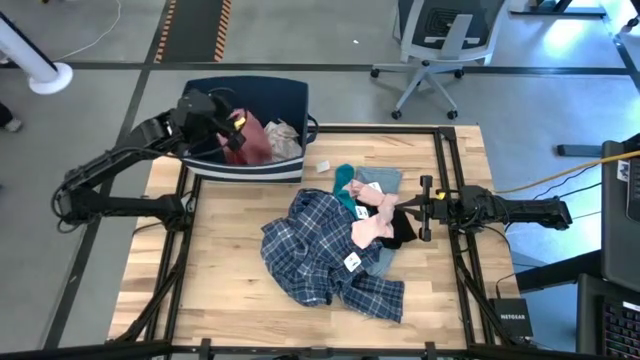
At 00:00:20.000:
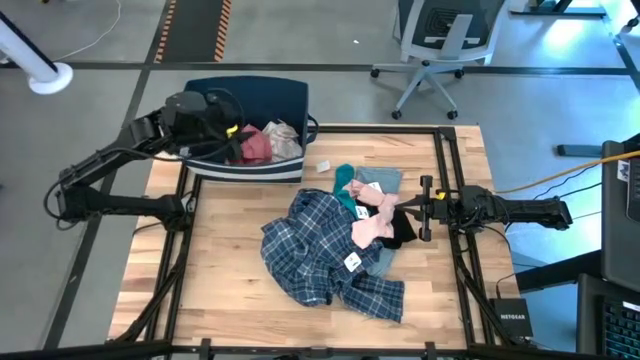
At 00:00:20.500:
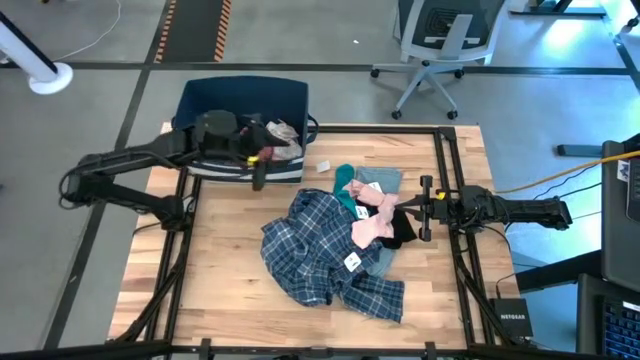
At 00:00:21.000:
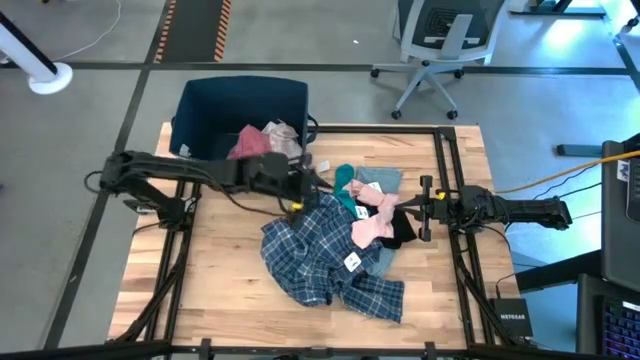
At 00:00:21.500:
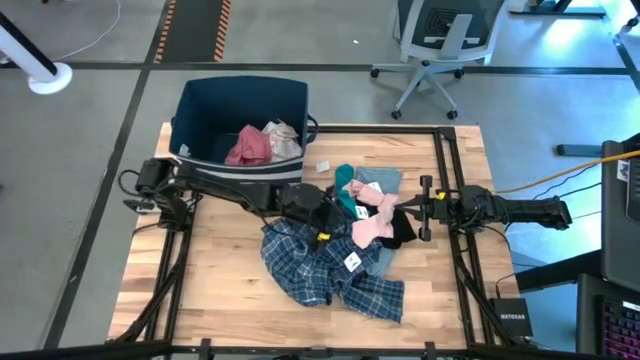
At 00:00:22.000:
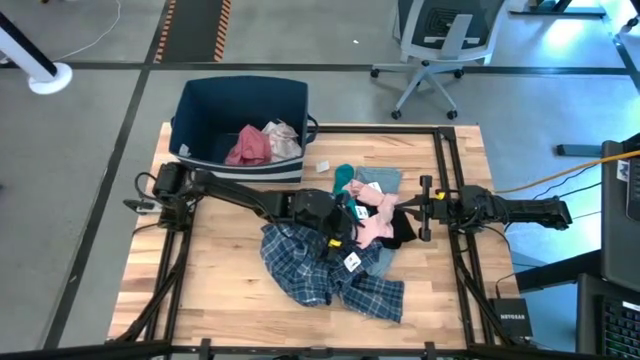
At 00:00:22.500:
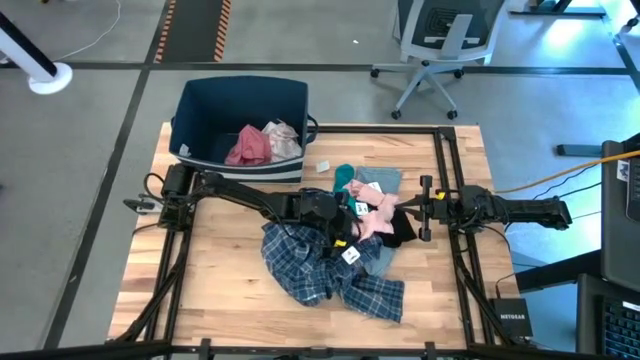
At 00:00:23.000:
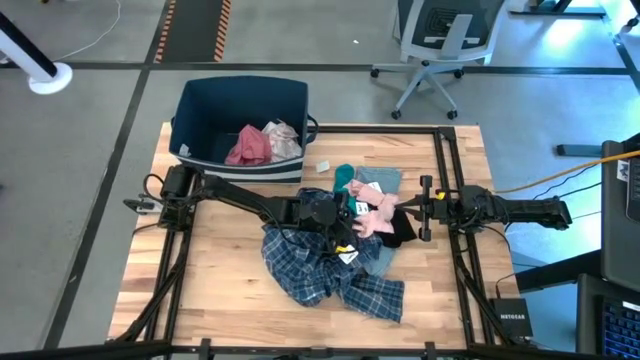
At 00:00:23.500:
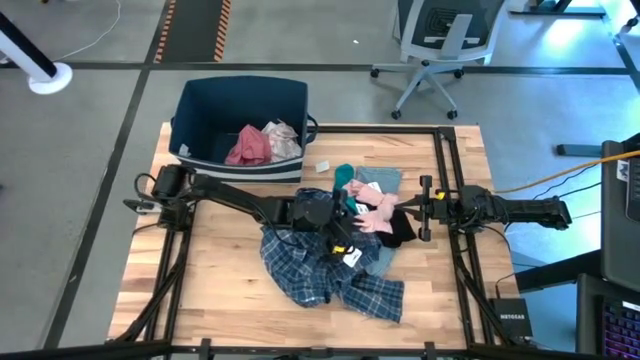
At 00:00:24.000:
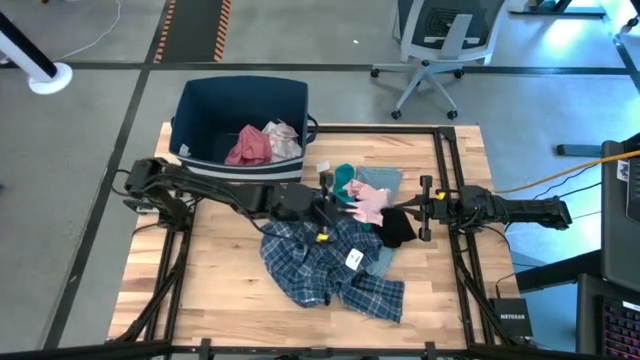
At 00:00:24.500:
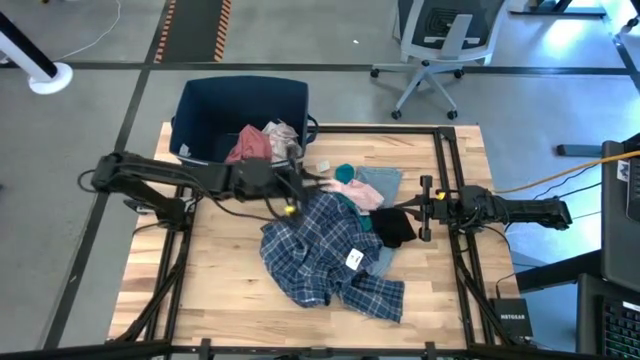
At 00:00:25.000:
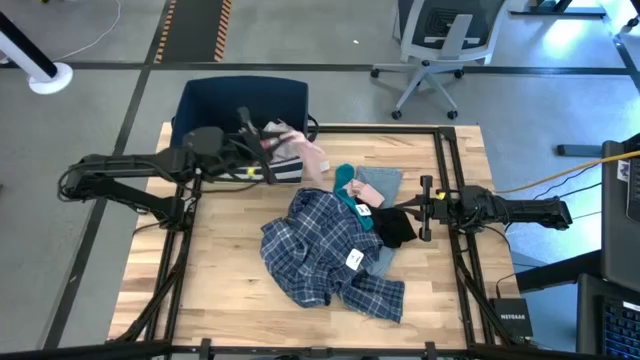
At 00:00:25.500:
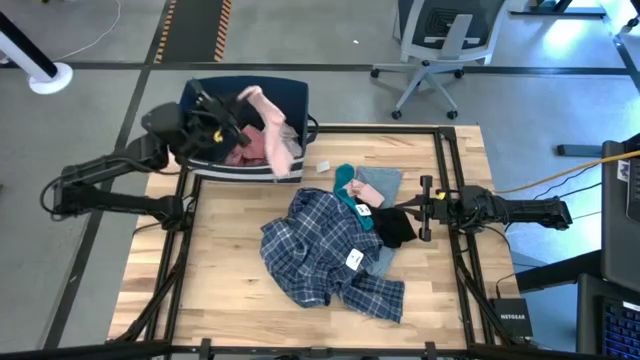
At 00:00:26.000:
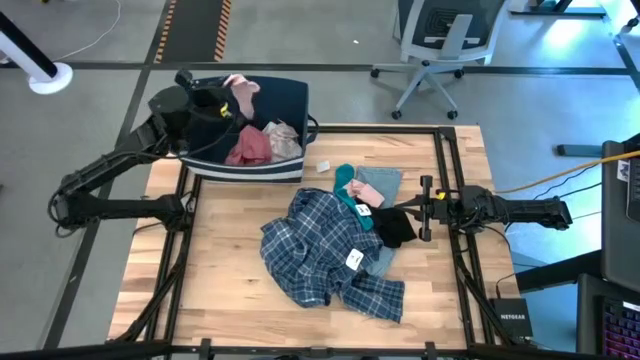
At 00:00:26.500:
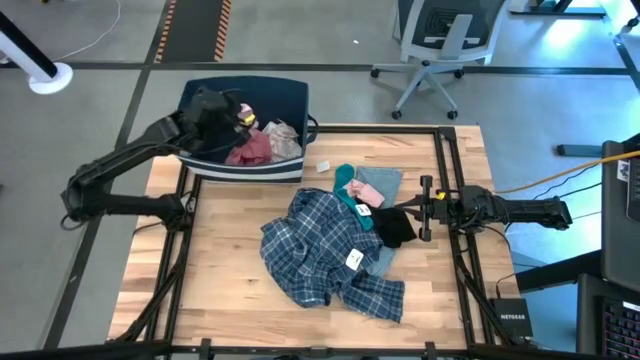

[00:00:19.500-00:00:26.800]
Task: Sort clothes
Put the bottom light orange sock into the blue laundry bin

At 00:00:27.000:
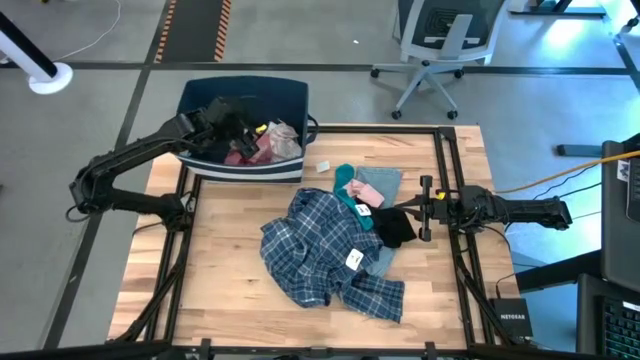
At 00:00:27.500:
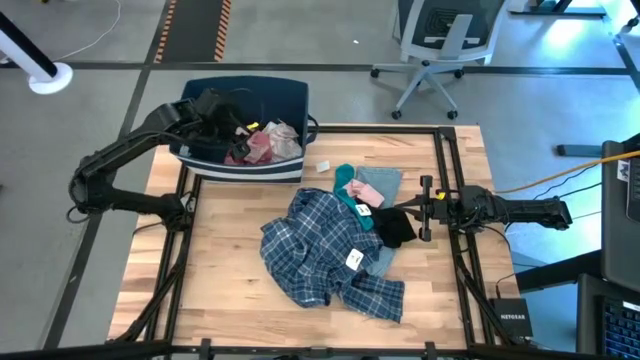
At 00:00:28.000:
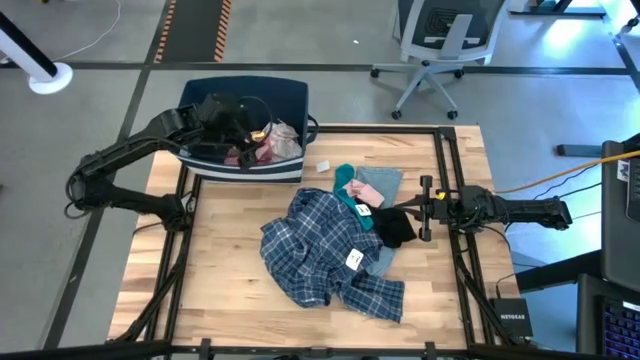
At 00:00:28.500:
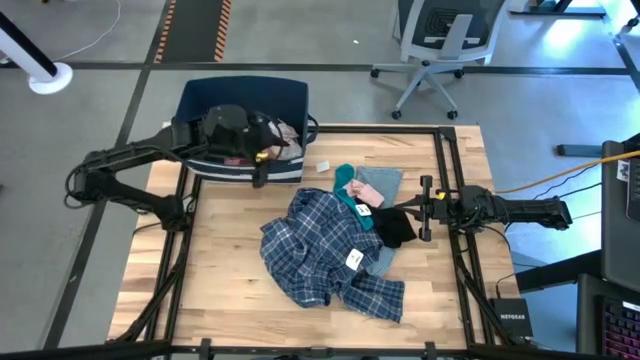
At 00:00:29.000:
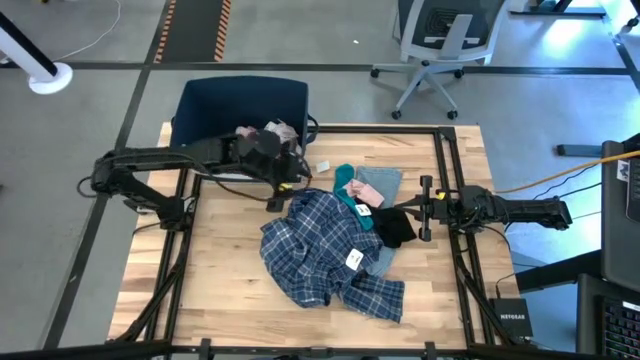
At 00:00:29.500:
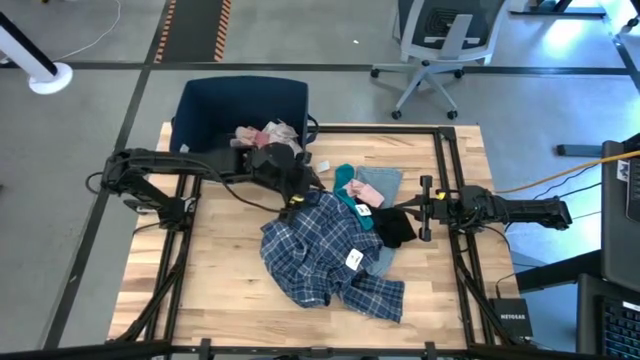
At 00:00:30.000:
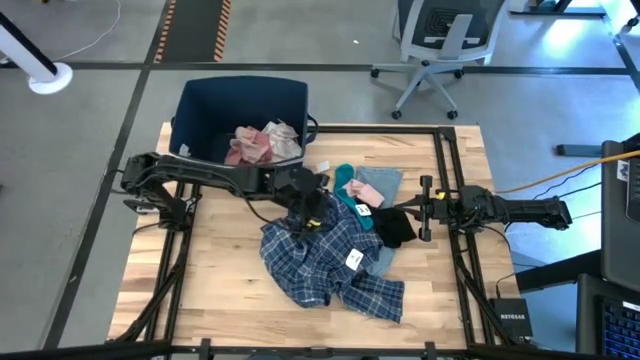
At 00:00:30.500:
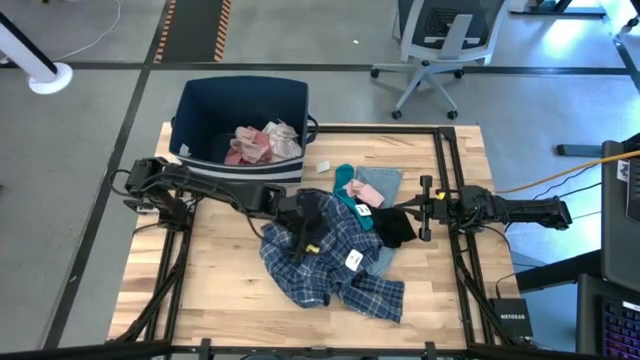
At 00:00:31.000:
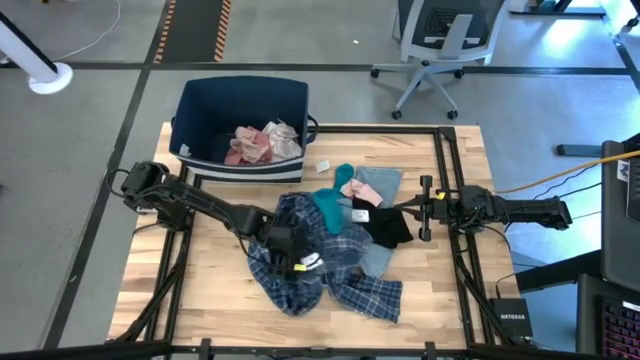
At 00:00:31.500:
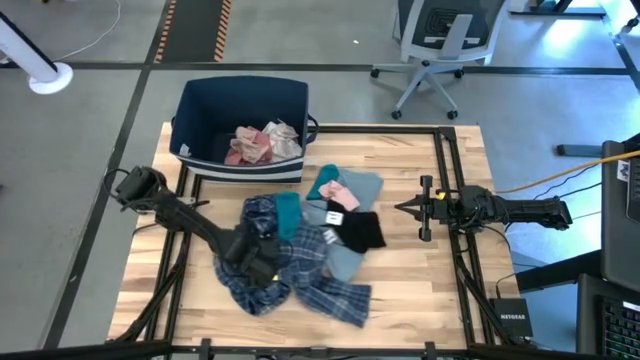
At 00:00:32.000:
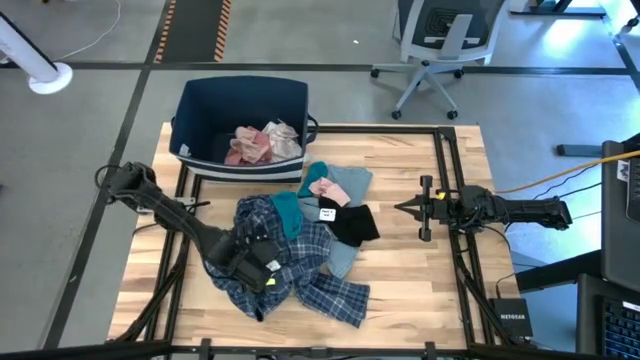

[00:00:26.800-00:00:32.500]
Move the clothes to the middle left

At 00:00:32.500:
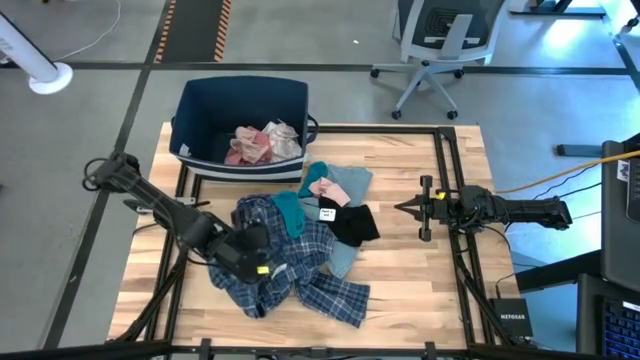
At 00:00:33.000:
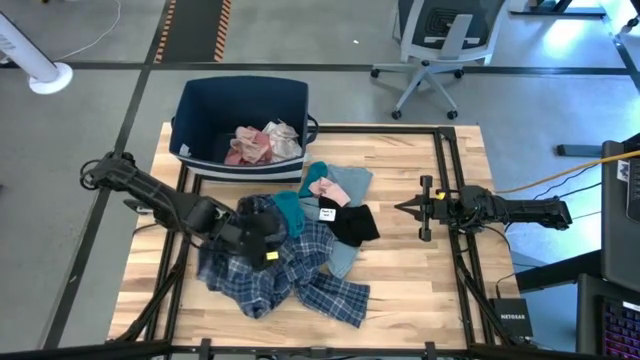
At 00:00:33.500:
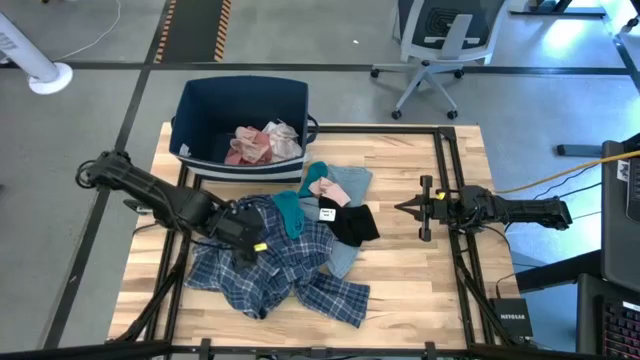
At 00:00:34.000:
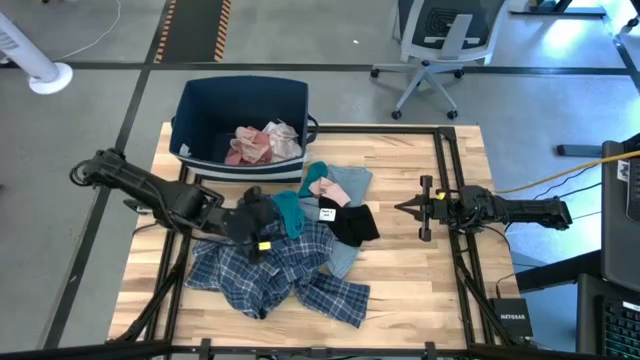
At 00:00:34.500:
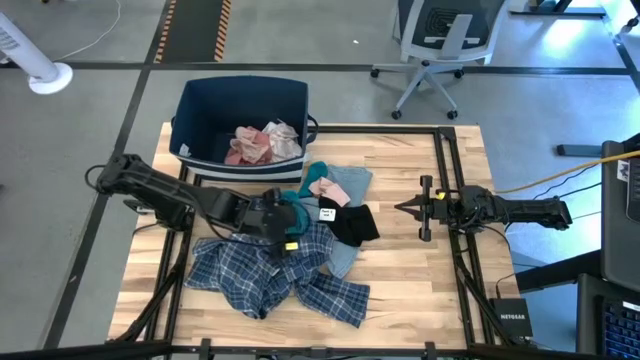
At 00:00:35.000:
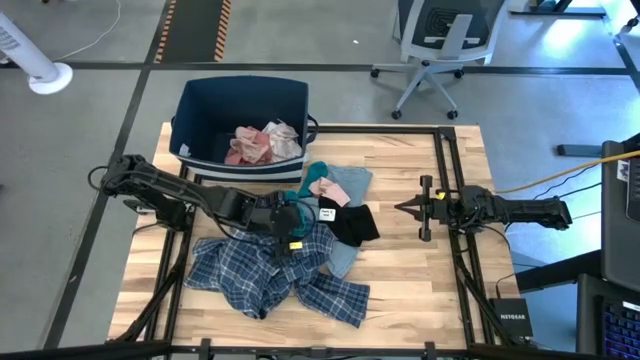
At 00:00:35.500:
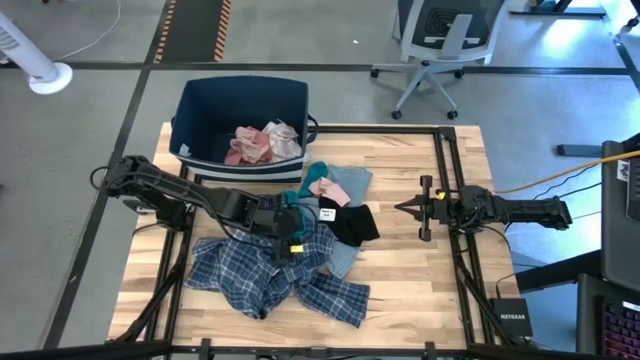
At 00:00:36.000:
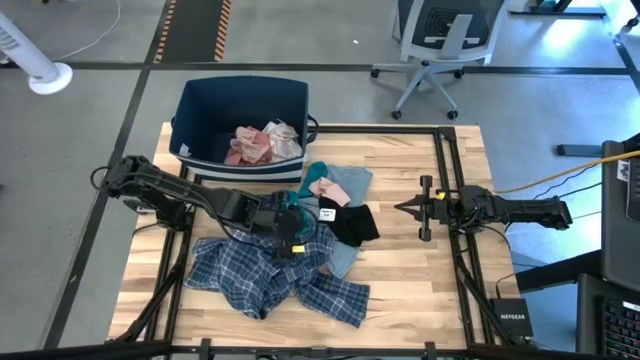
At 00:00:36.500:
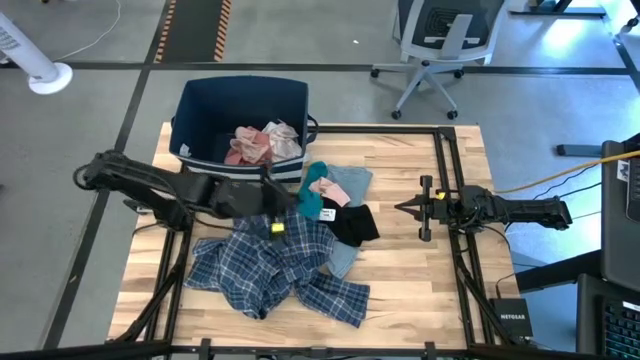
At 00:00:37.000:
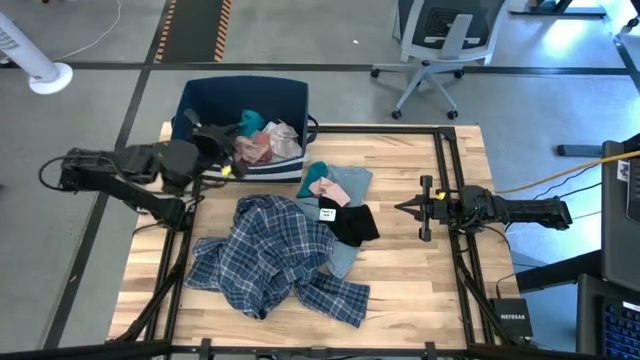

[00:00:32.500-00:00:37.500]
Put the bottom blue sock into the blue laundry bin

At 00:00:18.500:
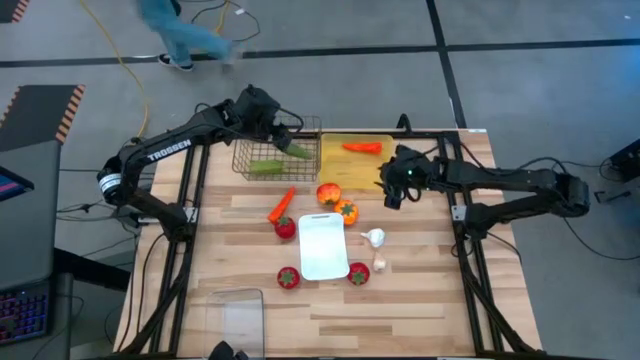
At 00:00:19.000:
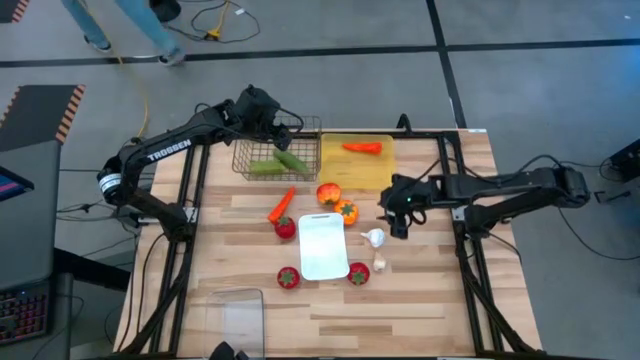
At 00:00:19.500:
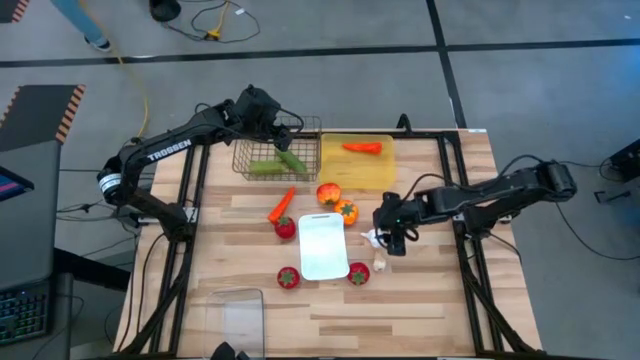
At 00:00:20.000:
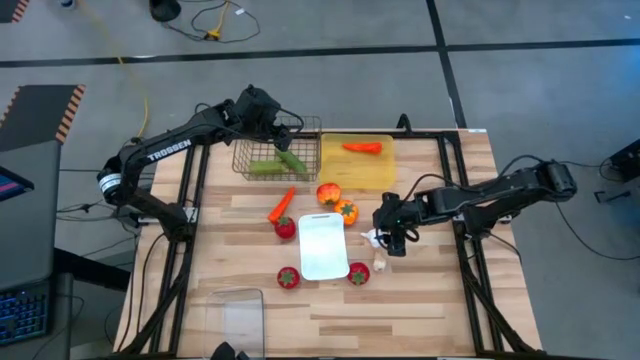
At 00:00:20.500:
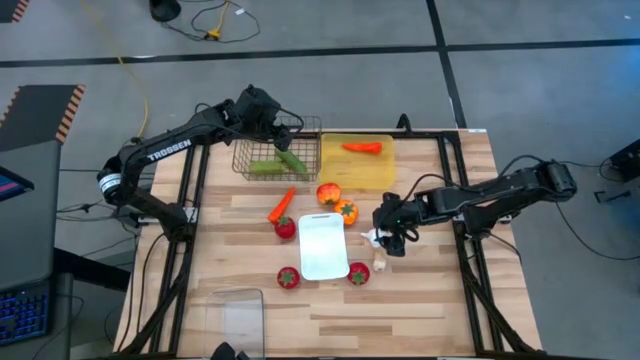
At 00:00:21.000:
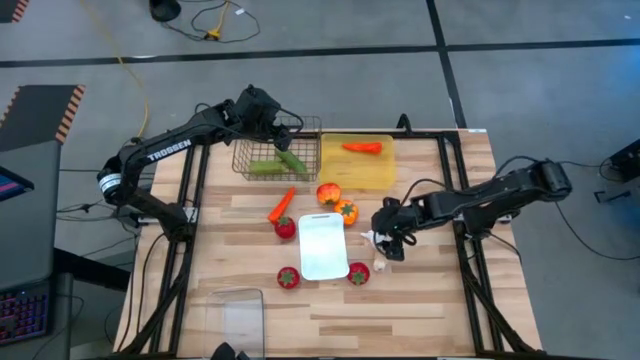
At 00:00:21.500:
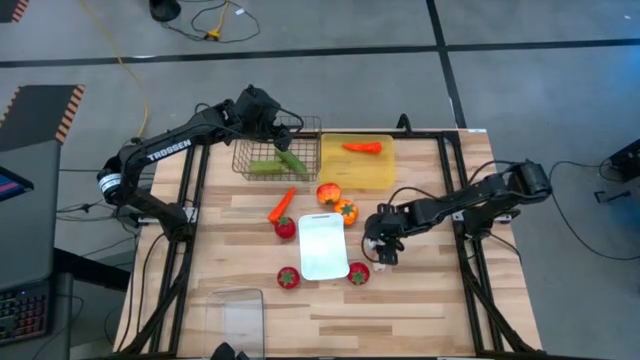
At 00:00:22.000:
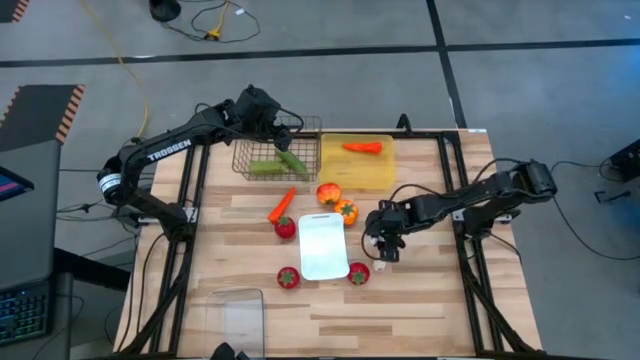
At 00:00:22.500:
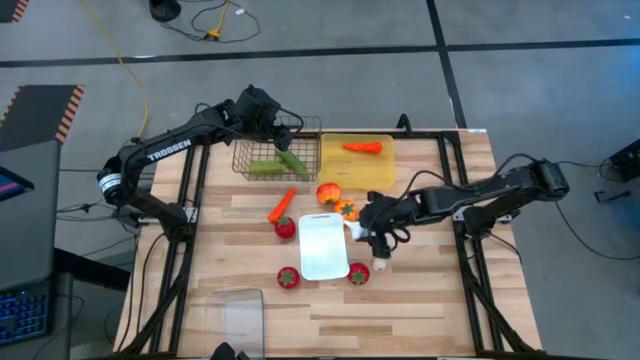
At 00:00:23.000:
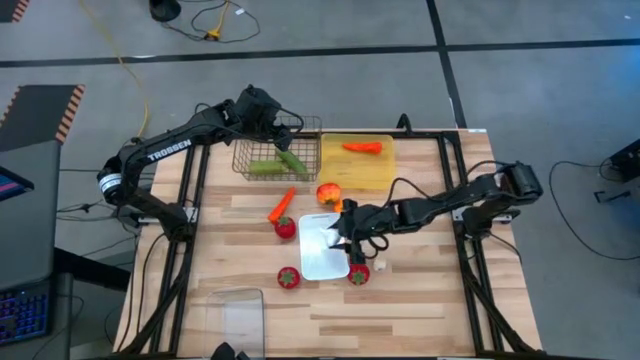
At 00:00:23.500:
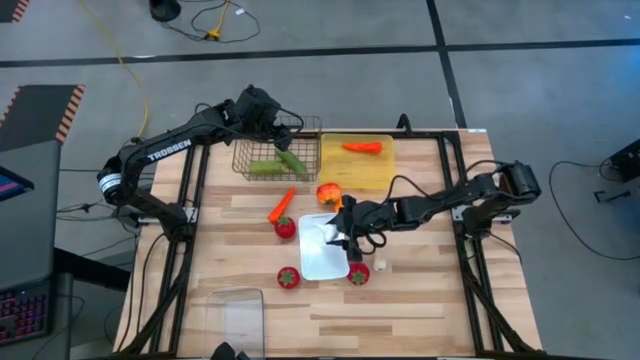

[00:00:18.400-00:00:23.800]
Task: Sort produce into baskets
Put the top garlic into the white bin
